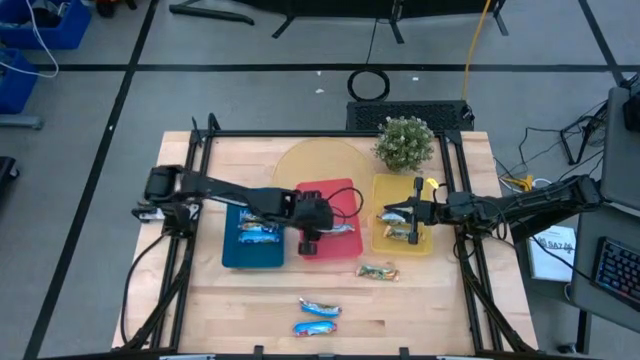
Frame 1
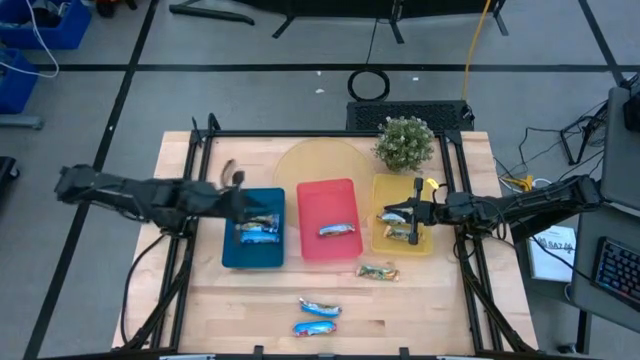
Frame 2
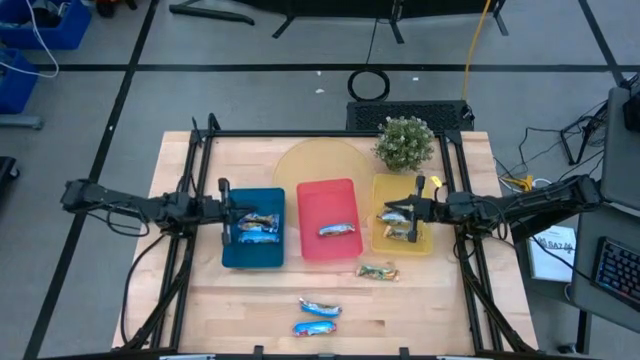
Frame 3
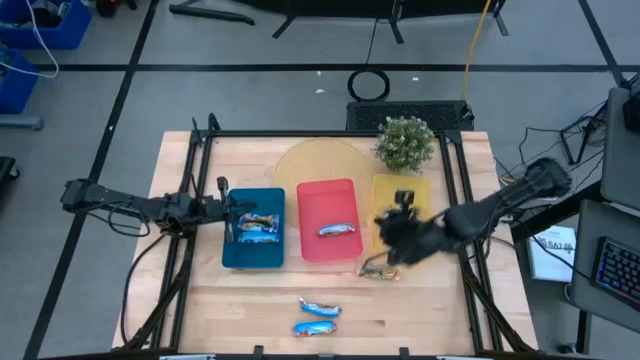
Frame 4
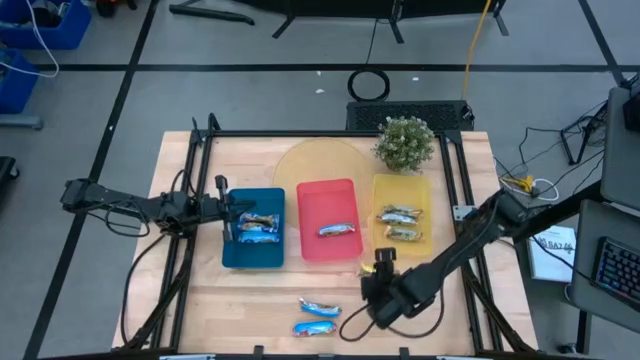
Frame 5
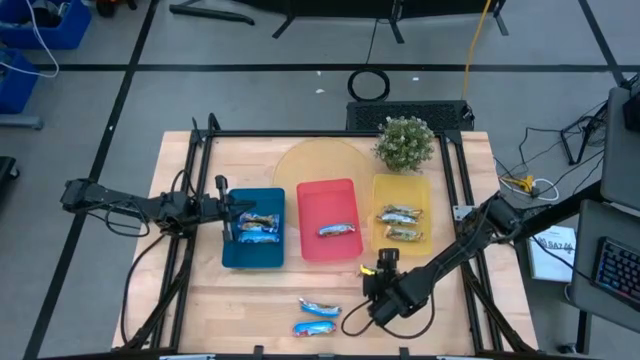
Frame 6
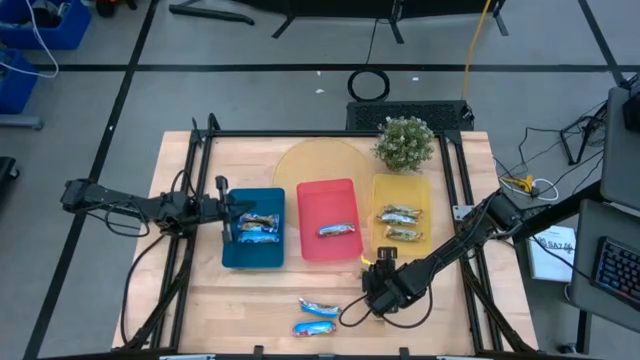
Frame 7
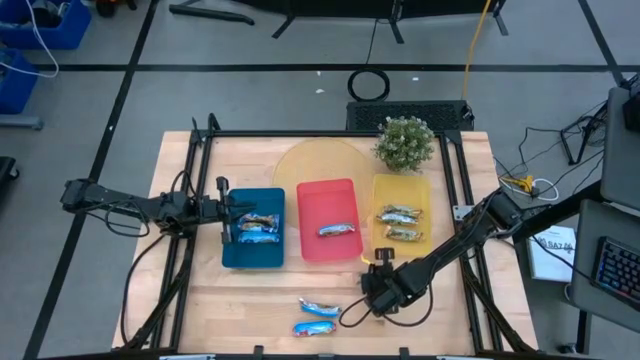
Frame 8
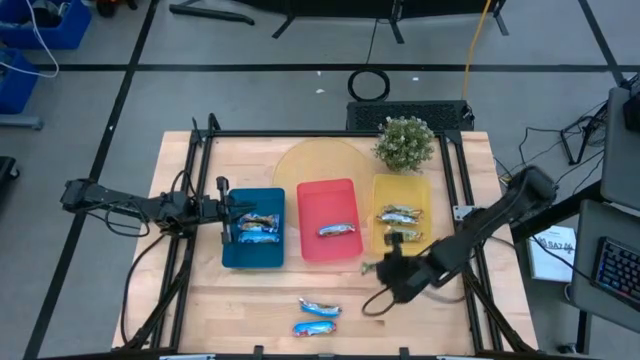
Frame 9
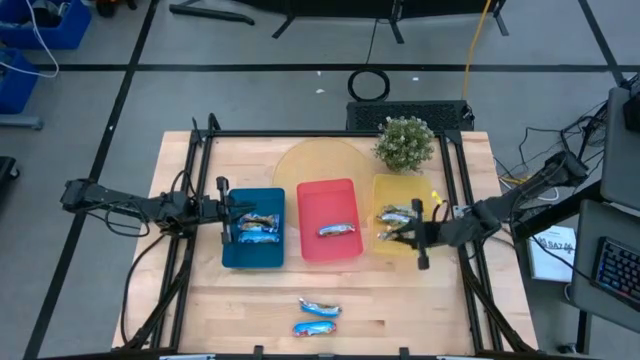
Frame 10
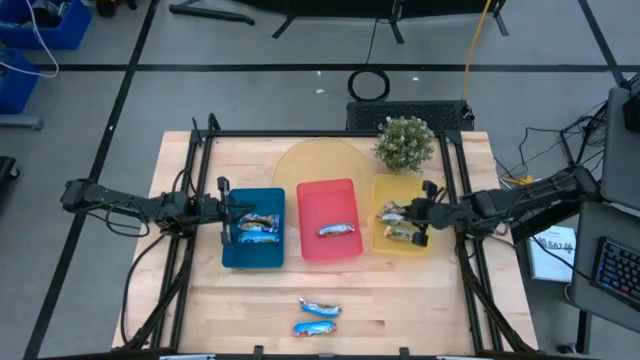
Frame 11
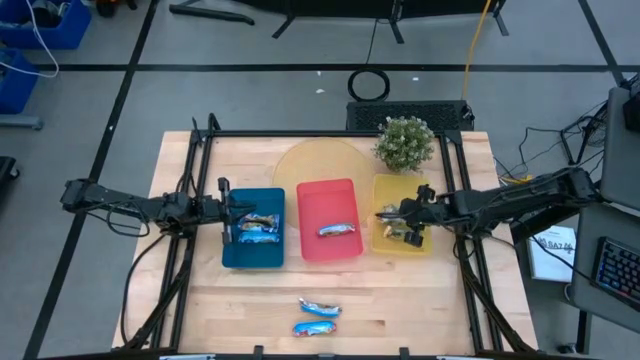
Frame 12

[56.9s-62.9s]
Task: Pick and place Granola Bars by type
Put the yellow granola bar into the yellow bin

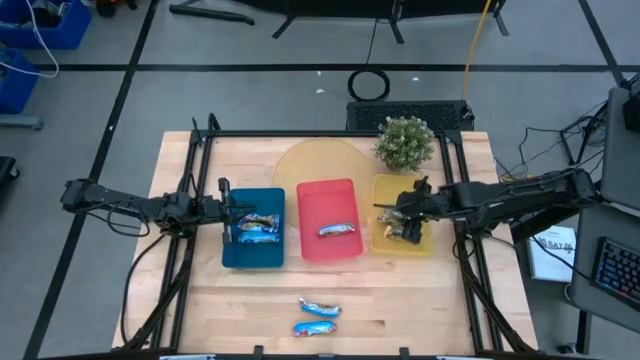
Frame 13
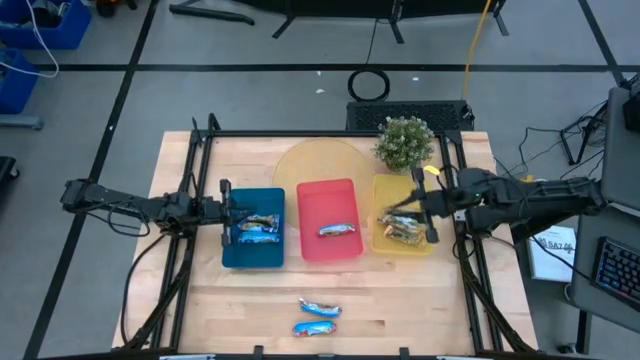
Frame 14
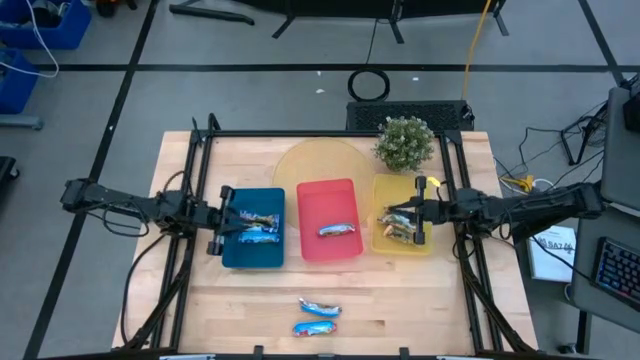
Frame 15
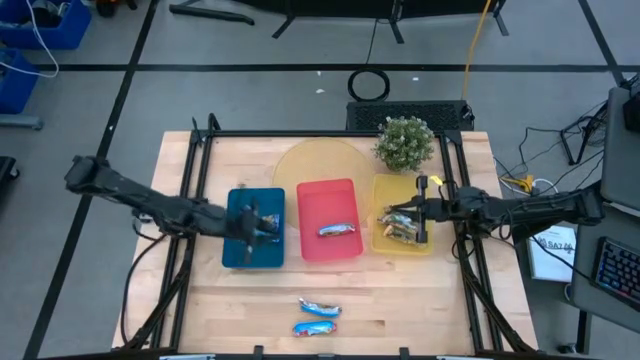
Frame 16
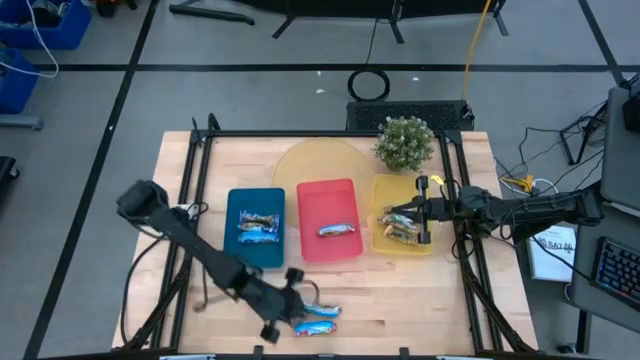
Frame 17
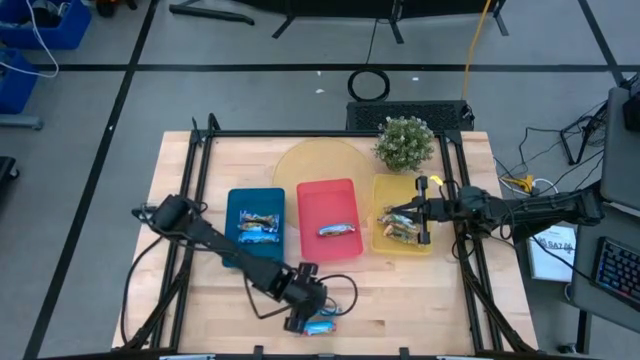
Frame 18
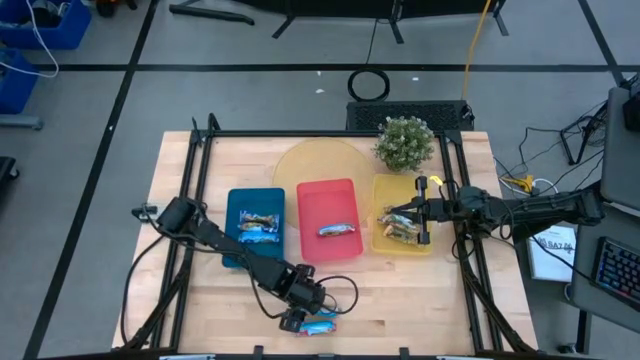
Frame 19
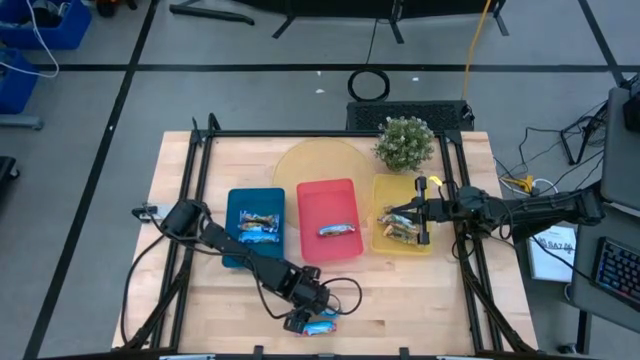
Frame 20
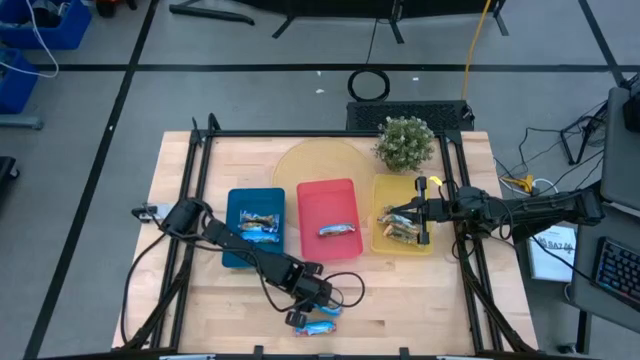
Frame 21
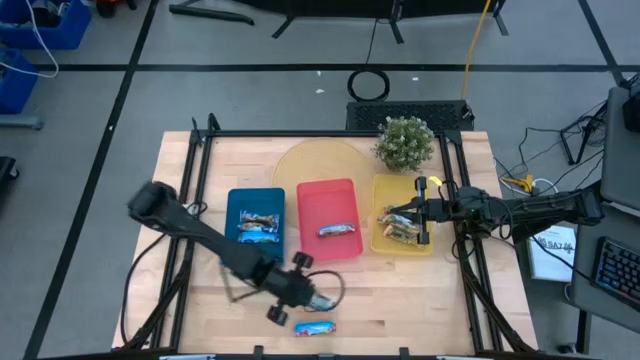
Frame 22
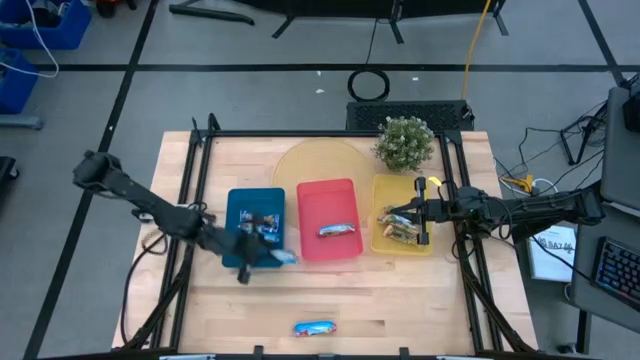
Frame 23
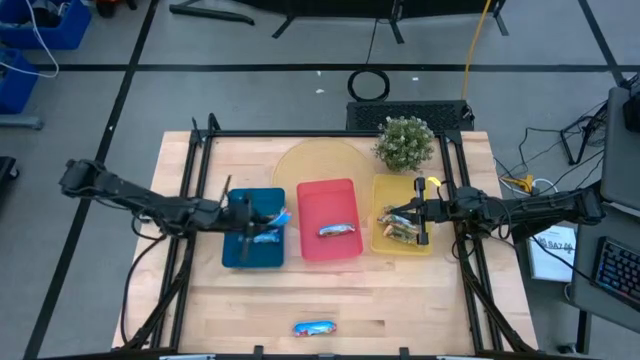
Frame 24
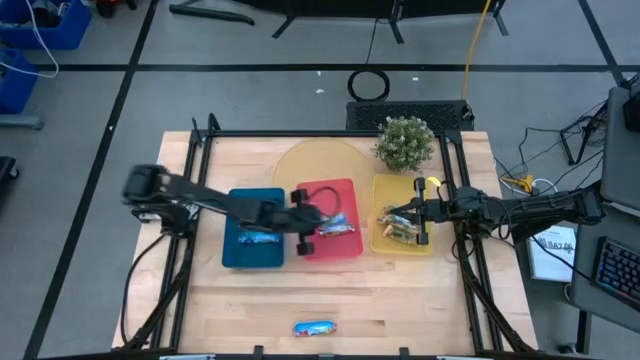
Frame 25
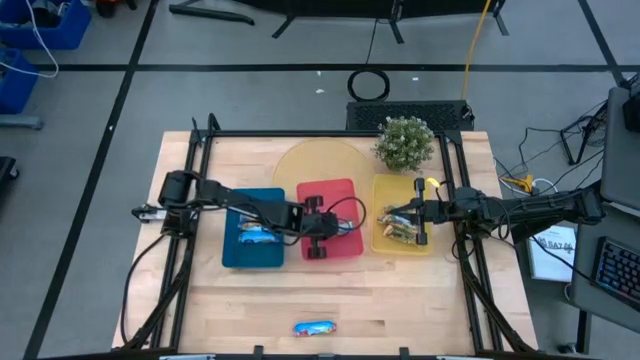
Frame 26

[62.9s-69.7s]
Put the red granola bar into the red bin

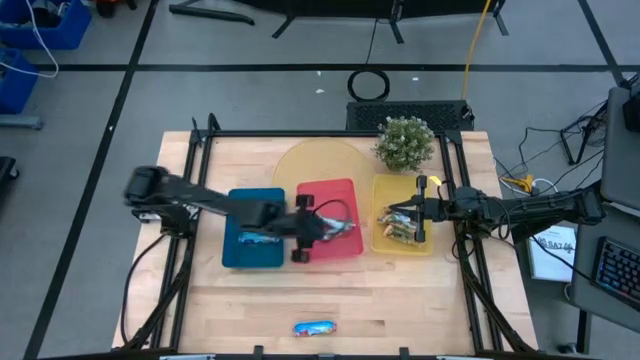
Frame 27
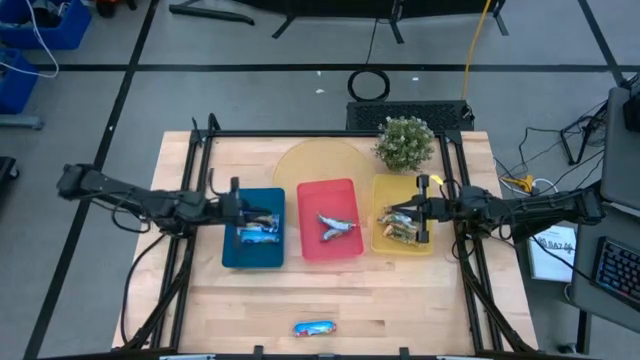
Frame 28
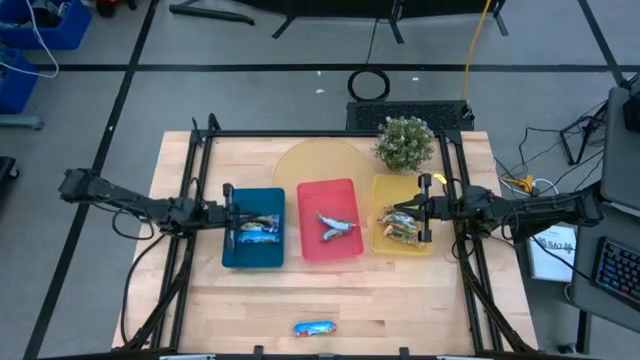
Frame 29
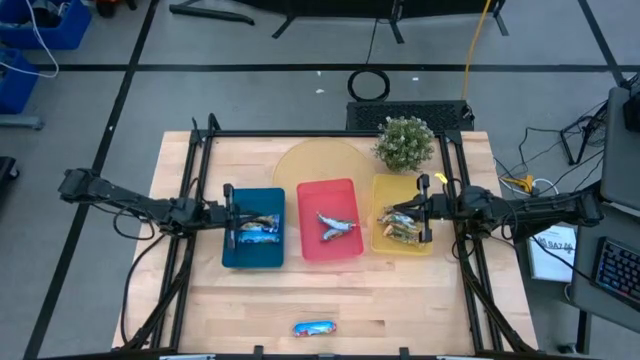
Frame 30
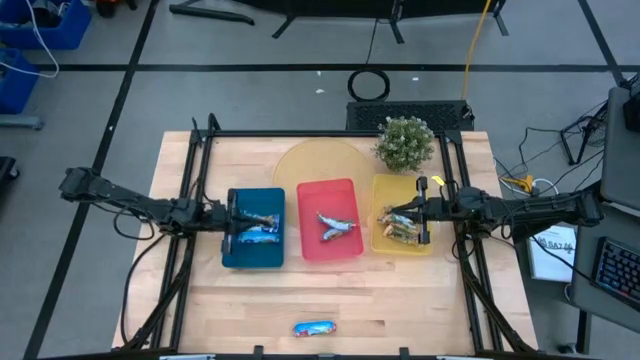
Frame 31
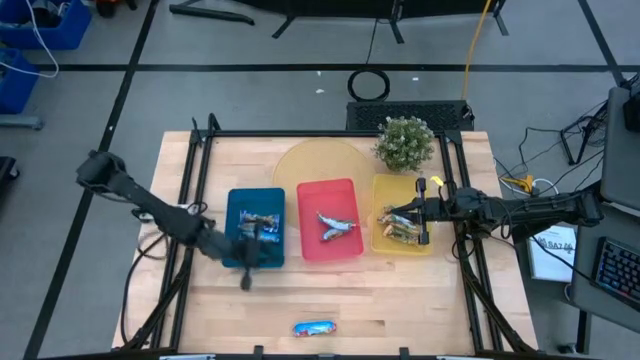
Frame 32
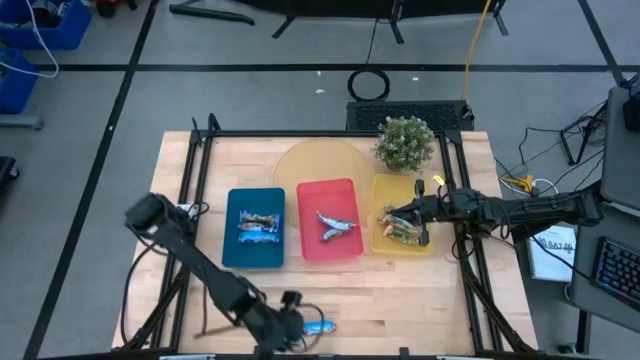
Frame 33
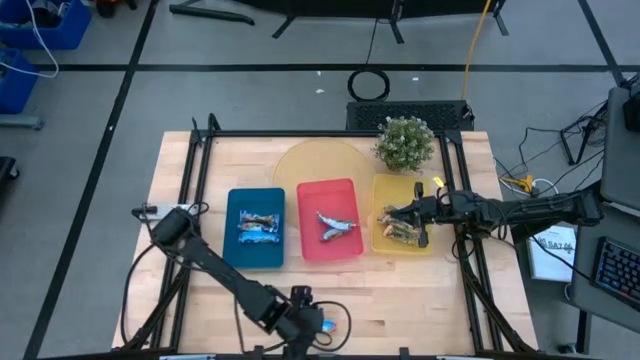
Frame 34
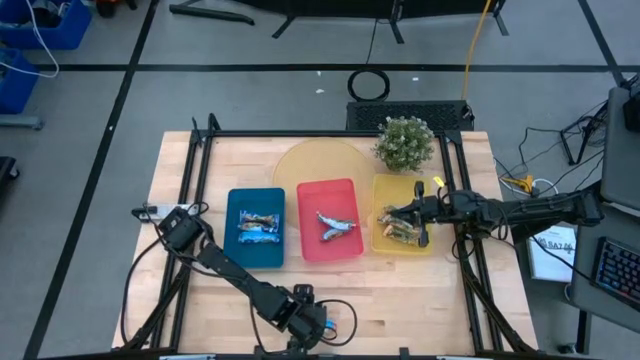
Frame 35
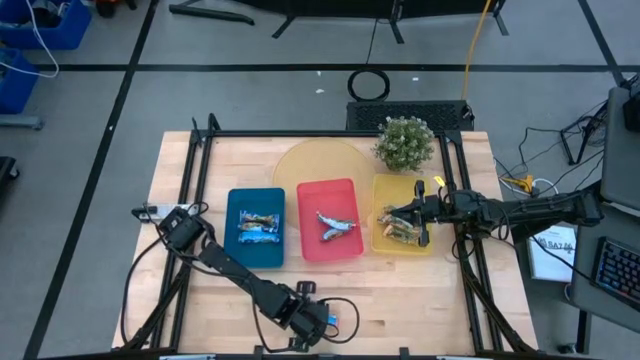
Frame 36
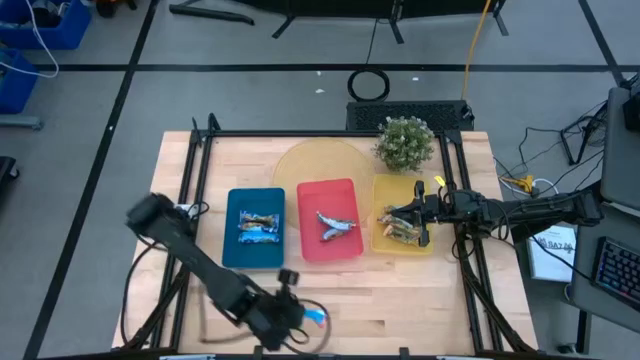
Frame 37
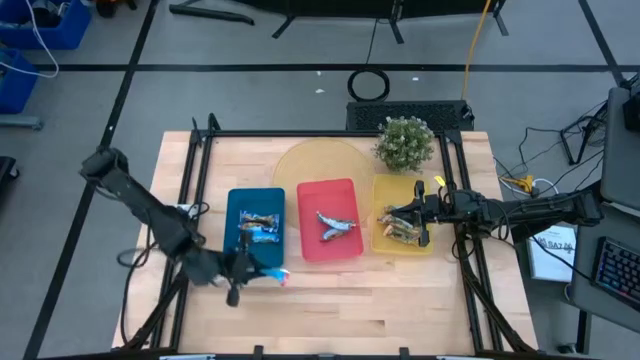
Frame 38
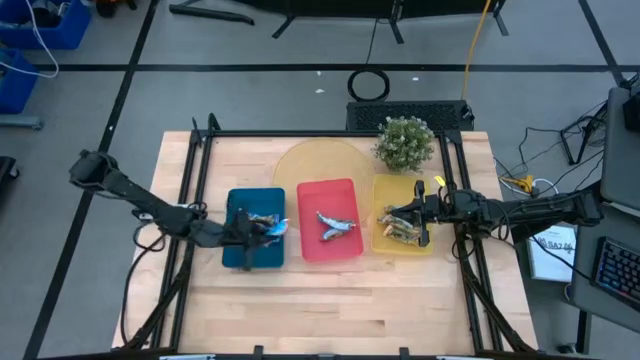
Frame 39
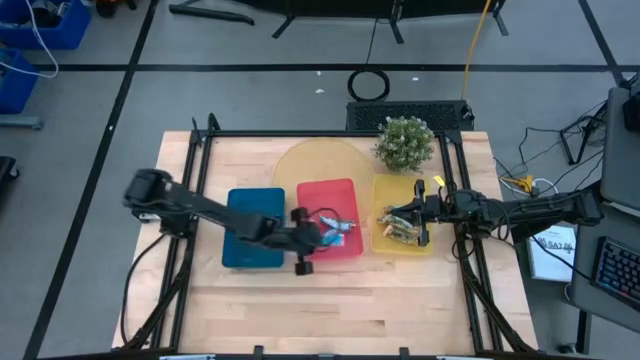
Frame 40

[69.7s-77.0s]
Put the red granola bar into the red bin

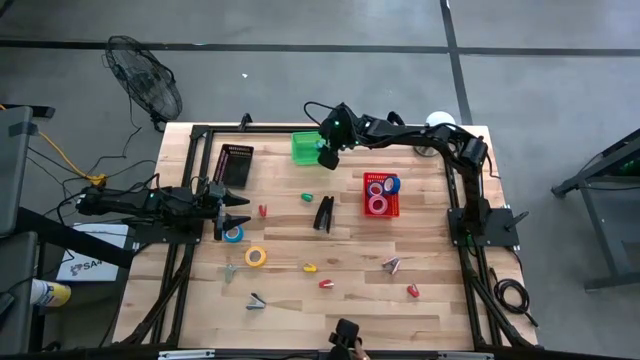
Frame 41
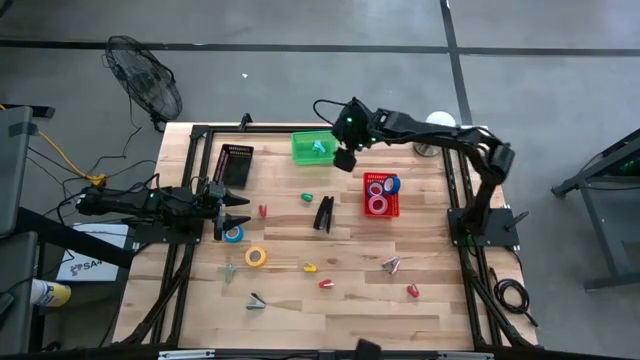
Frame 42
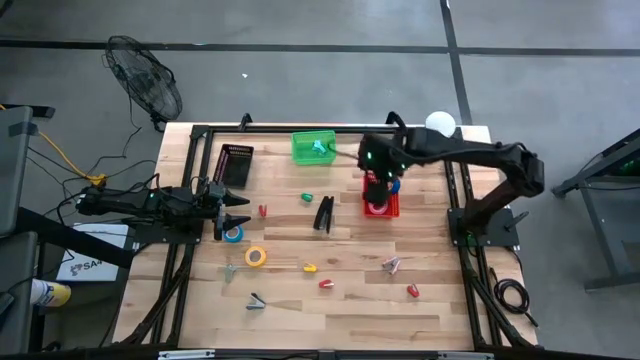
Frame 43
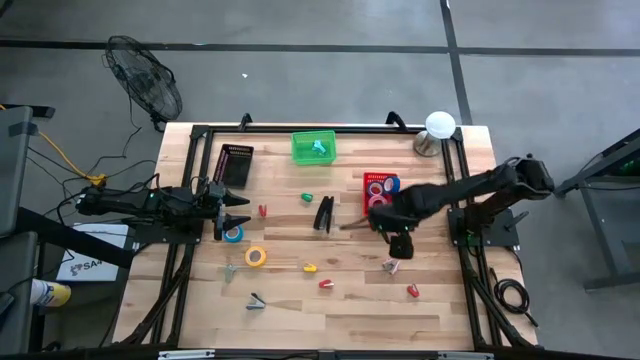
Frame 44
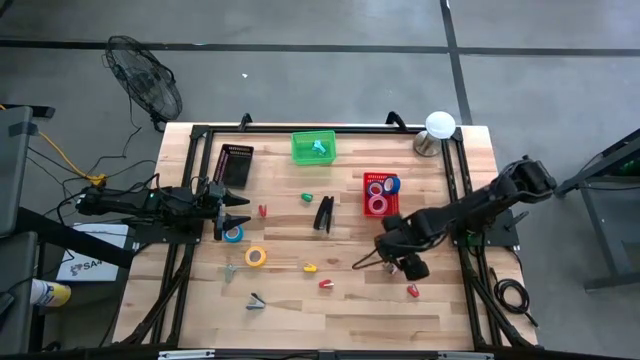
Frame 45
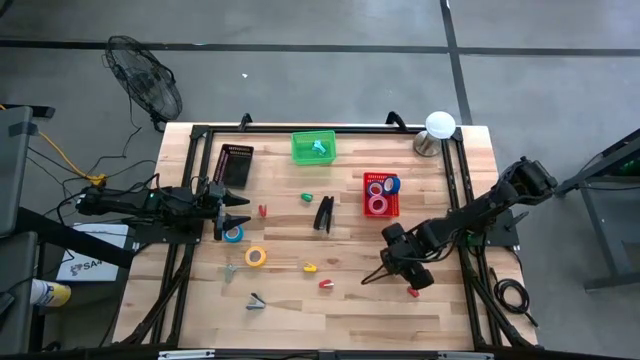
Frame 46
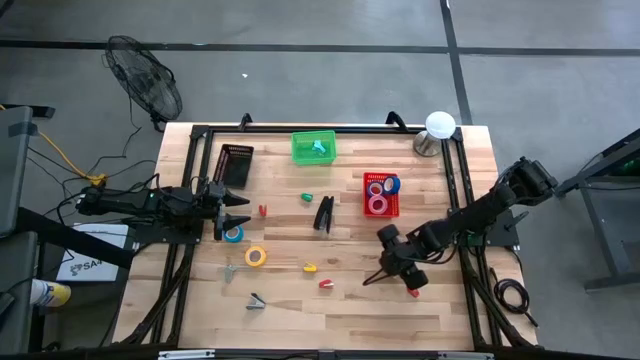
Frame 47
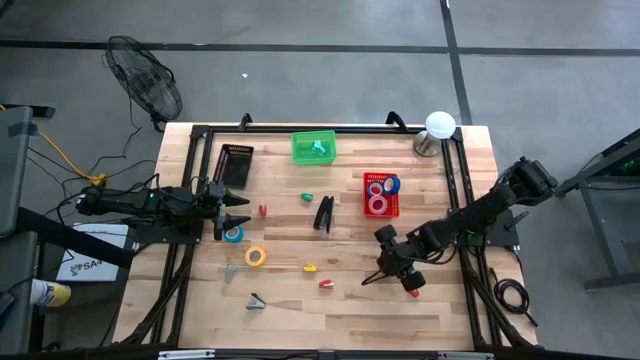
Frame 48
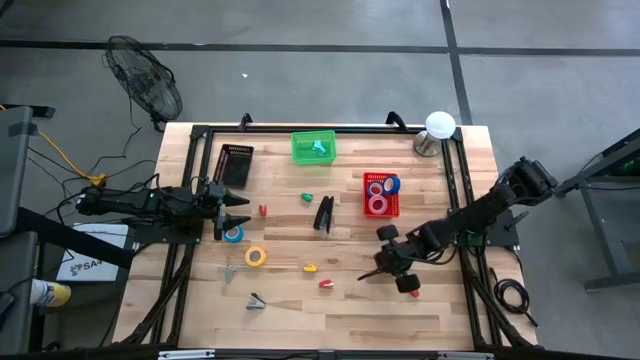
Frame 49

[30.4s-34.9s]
Task: Pick and place Stapler, Stapler remover, tape
Put the pink staple remover into the green bin
